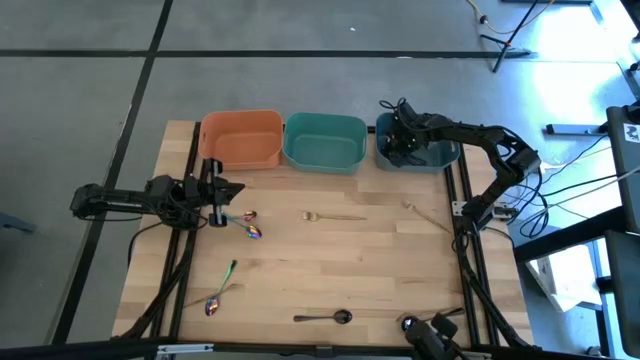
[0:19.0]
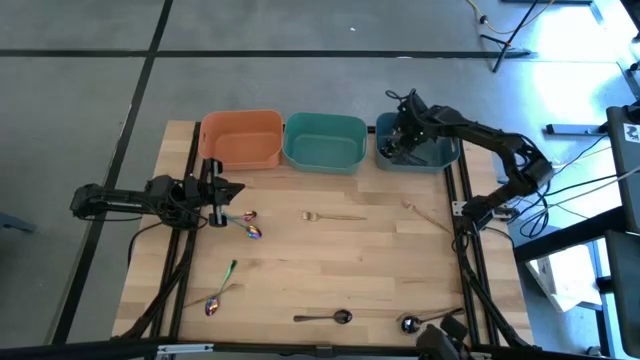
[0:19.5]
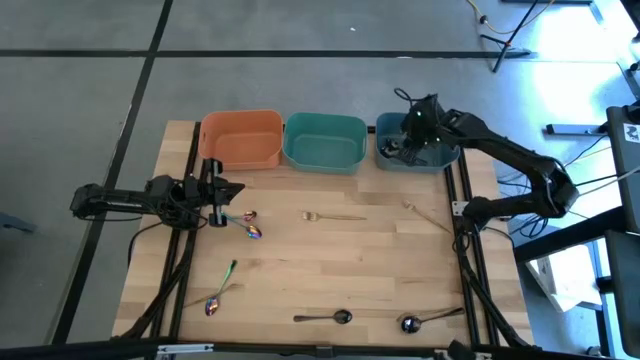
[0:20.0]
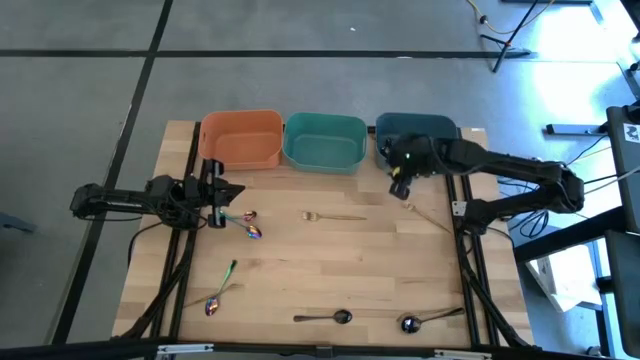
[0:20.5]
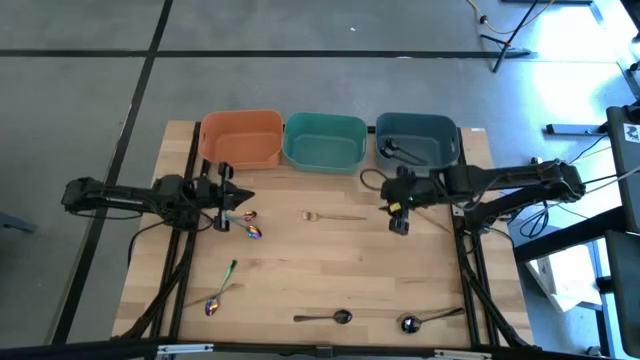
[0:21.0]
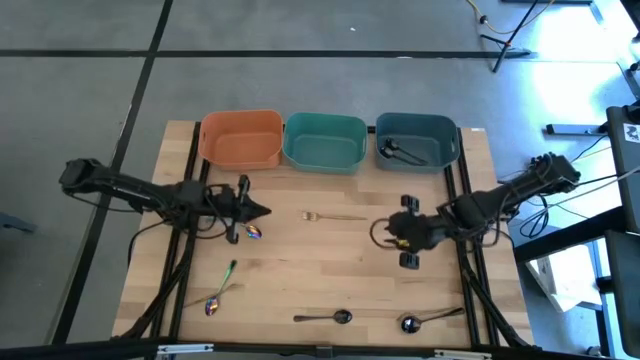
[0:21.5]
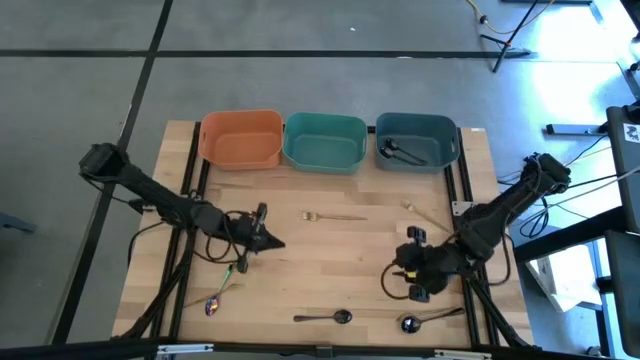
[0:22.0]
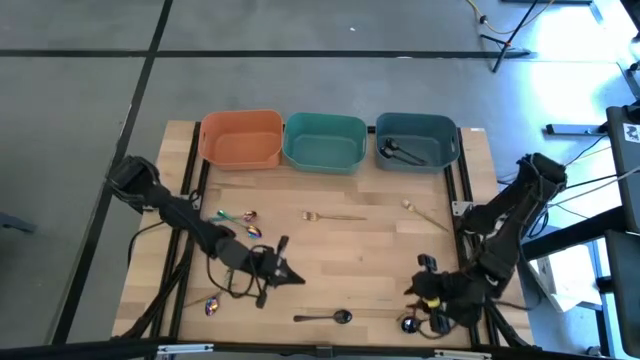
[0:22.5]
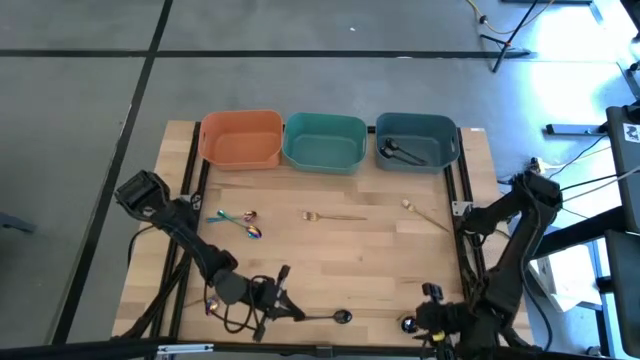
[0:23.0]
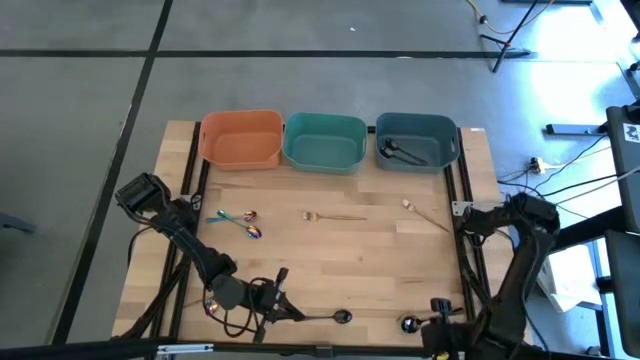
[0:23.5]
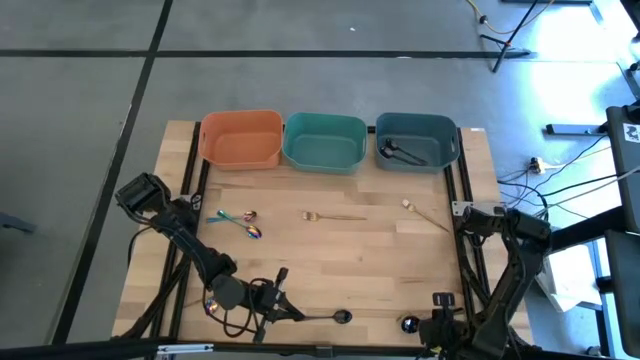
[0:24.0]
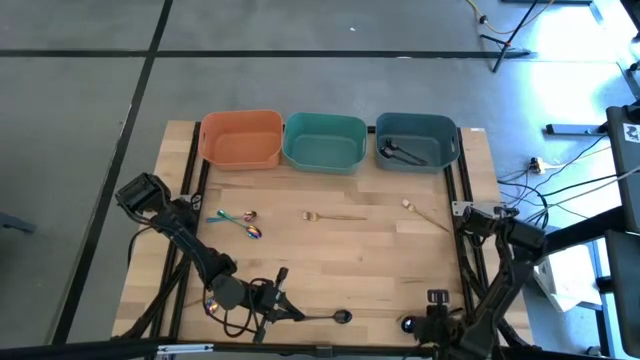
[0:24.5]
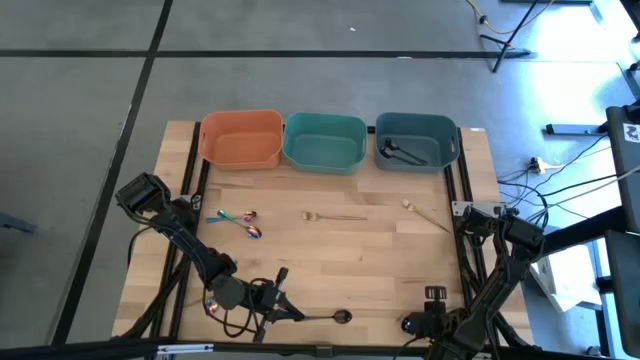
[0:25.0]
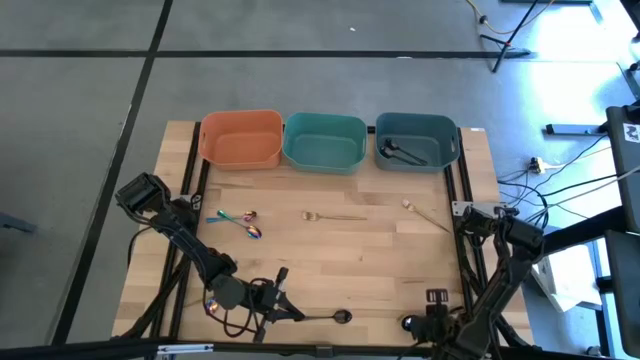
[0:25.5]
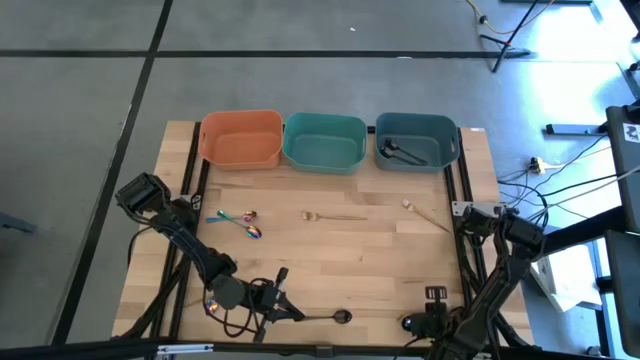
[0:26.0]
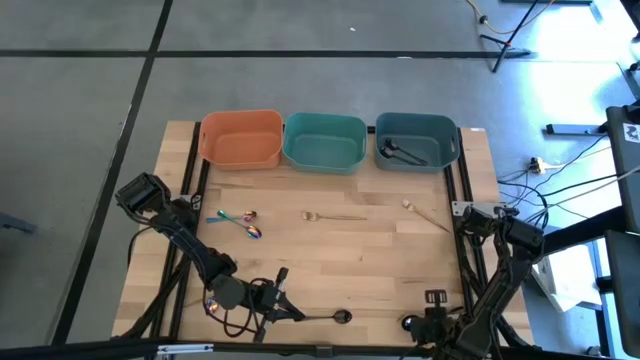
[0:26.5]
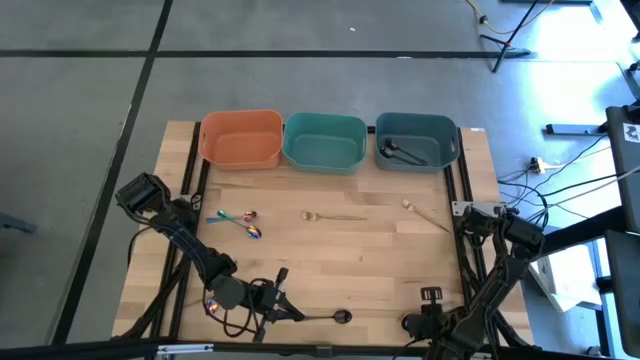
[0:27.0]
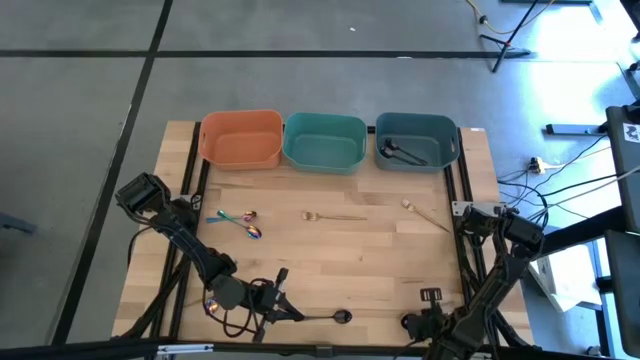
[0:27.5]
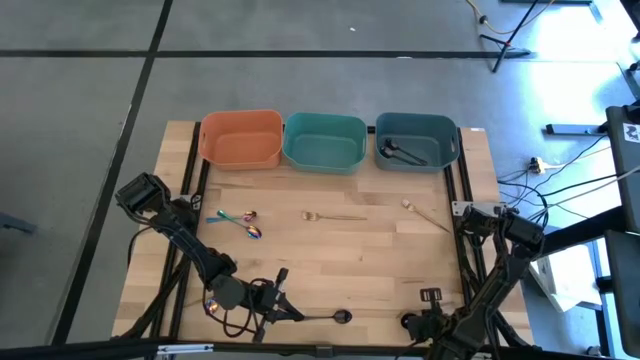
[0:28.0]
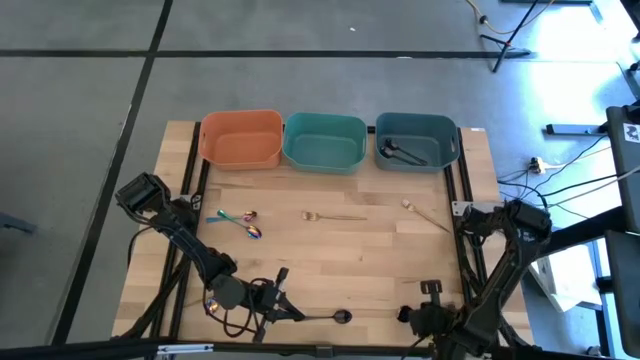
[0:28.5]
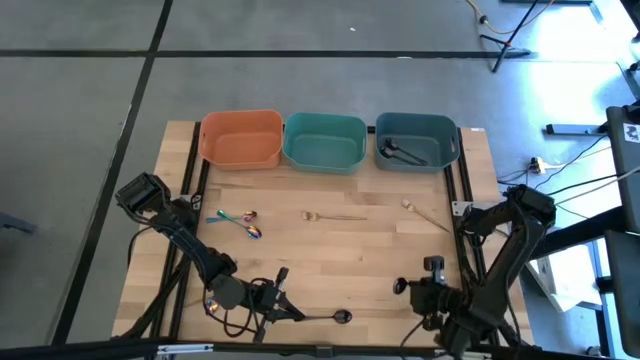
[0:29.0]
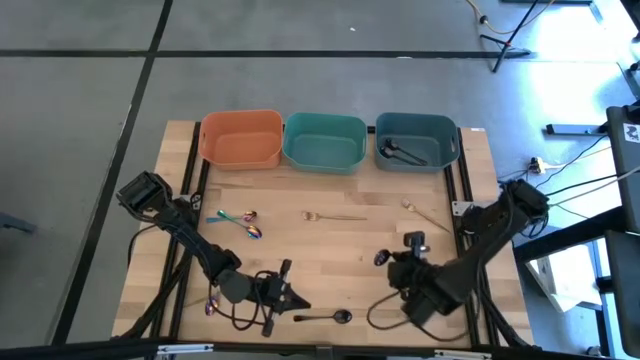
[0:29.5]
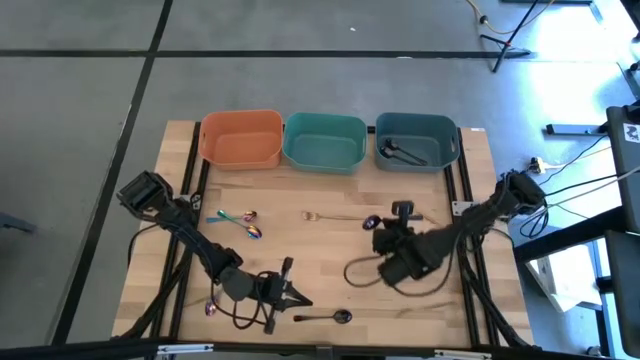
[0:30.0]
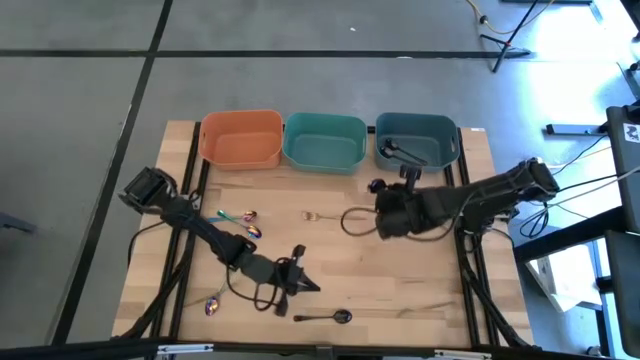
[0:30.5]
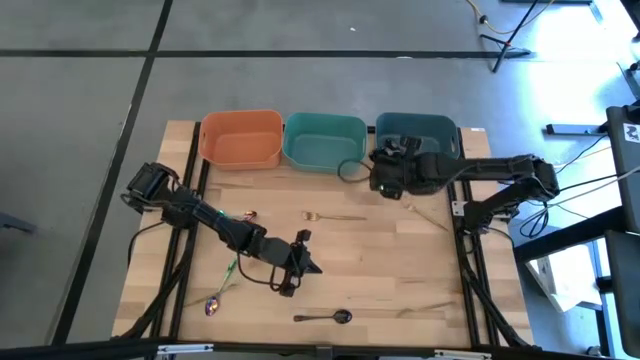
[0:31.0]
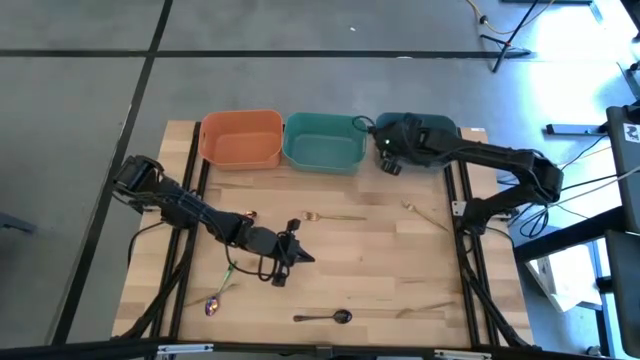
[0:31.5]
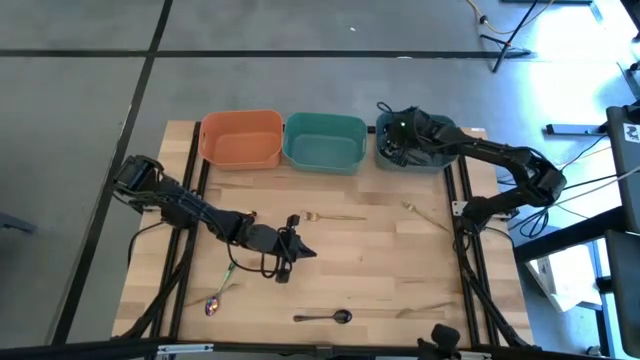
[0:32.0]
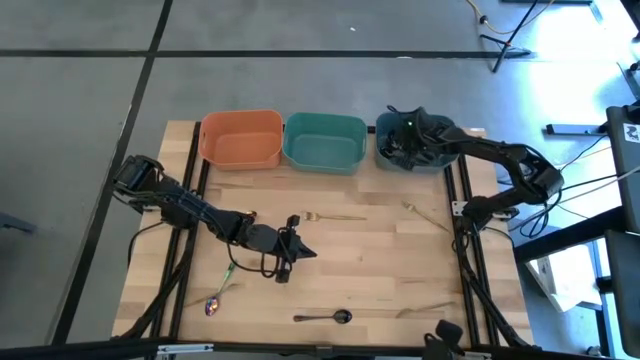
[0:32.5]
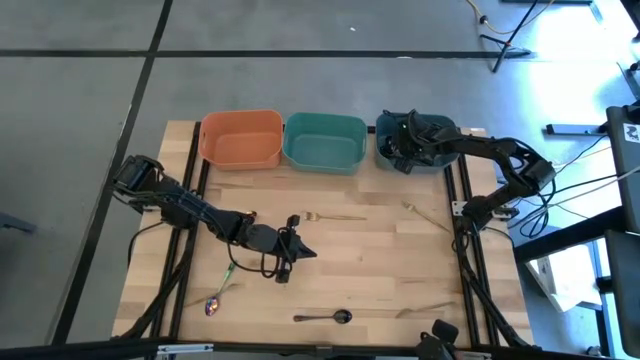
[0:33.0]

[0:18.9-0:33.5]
Task: Sort silverware by color (type)
Put the black spoon into the blue bin

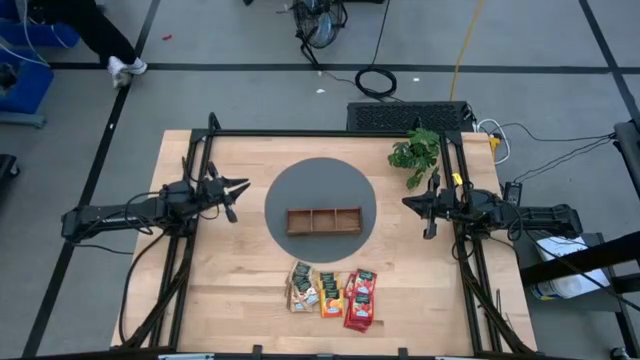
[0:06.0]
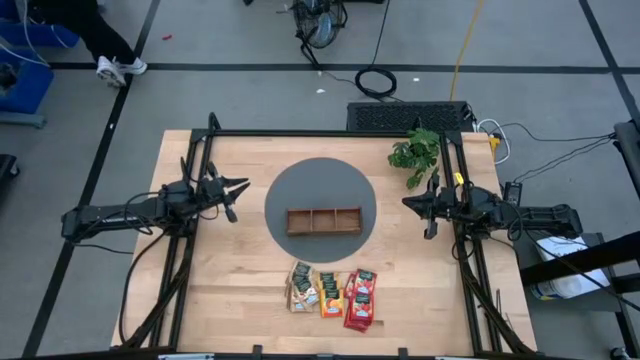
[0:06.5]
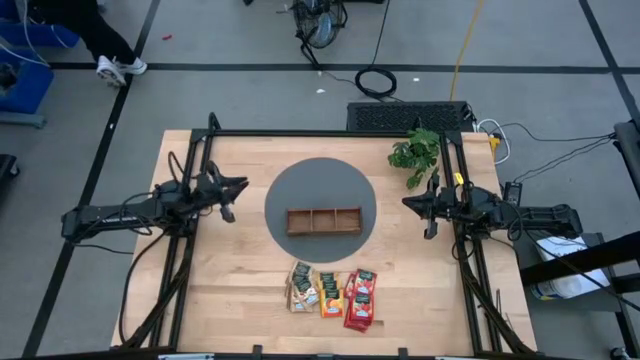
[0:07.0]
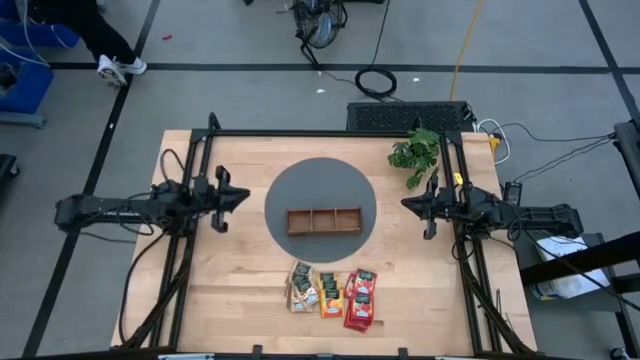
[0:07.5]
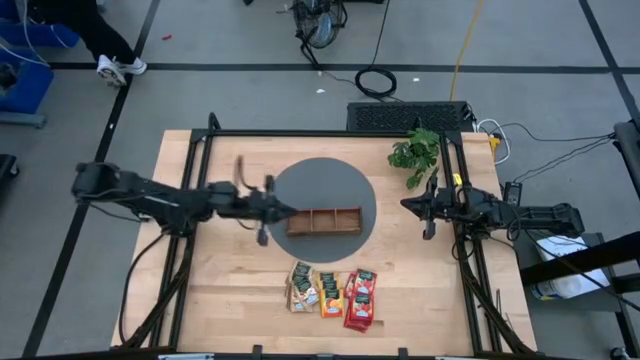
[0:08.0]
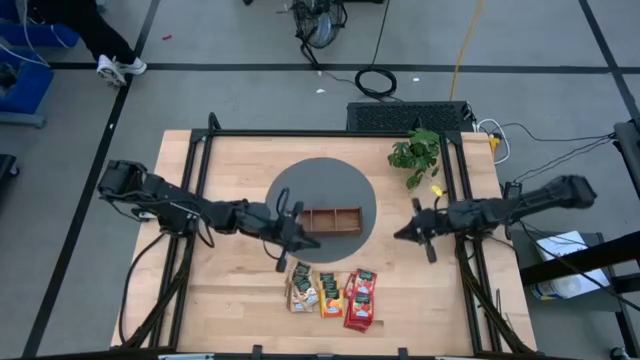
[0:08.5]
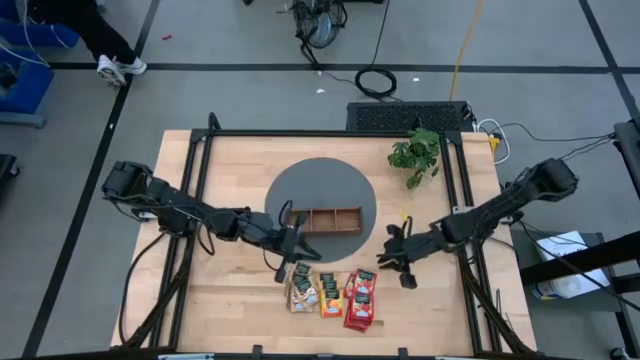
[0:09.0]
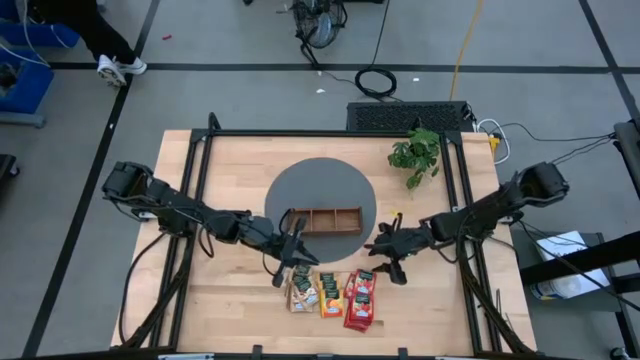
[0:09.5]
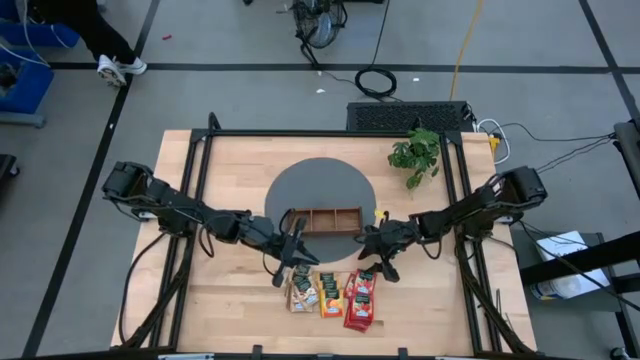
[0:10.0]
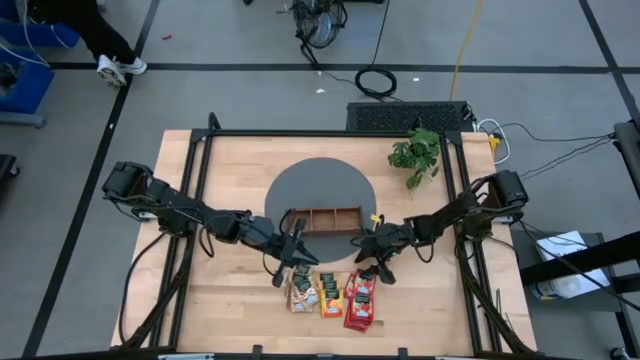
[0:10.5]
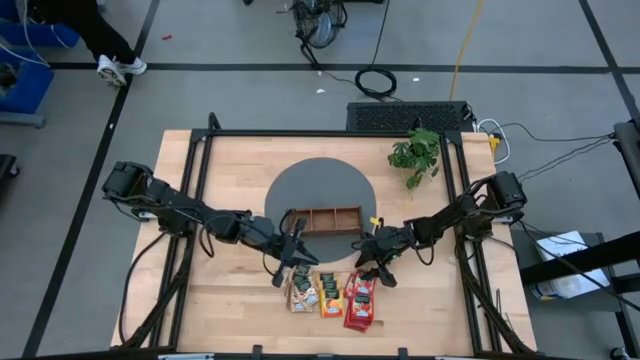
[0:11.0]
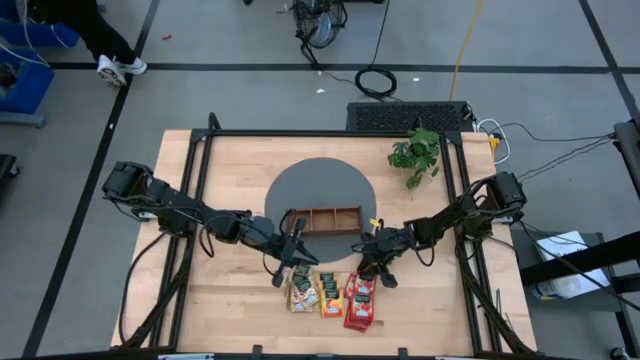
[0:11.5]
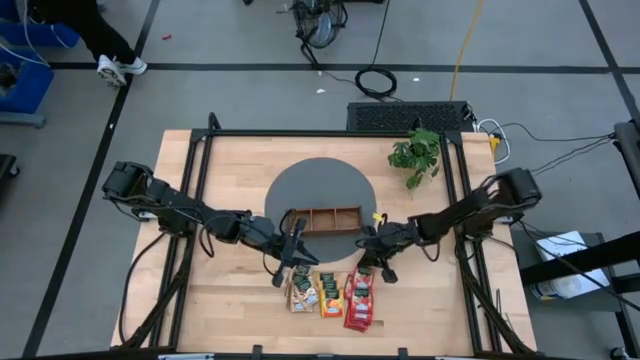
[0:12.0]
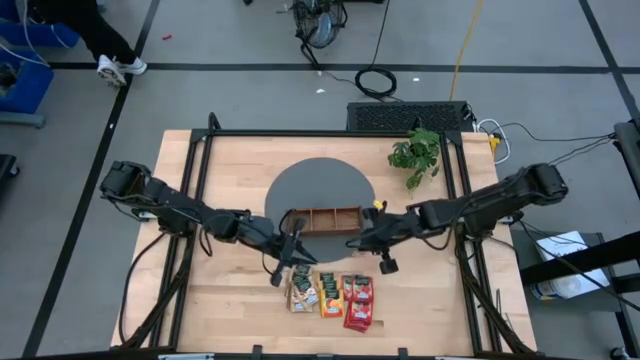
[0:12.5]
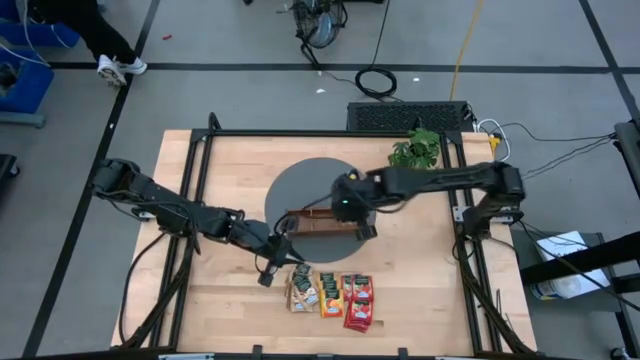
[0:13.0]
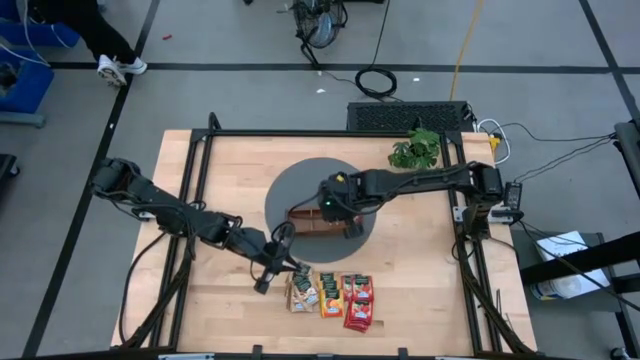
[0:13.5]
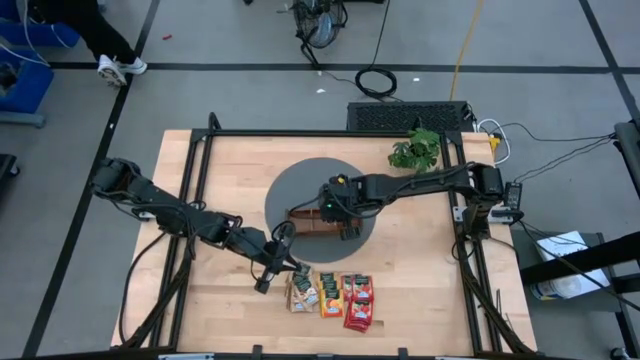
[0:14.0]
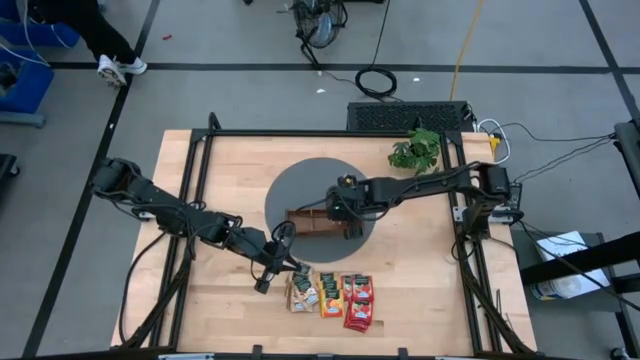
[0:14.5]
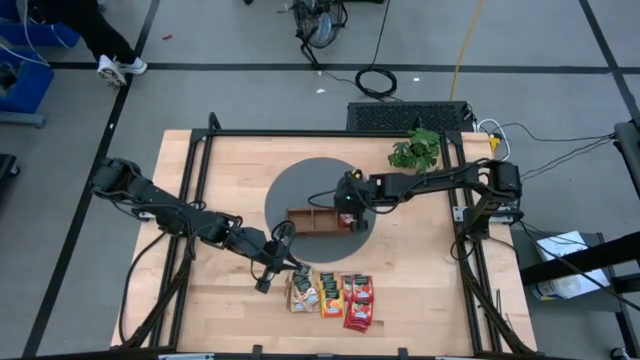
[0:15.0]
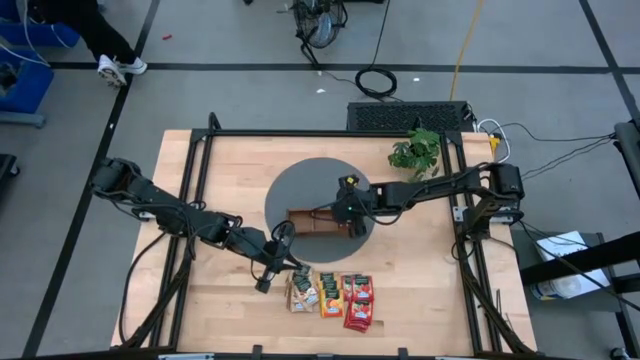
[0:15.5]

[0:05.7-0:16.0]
Task: Pick & Place Tea
Put the red tea bag into the right slot of the wooden organizer
